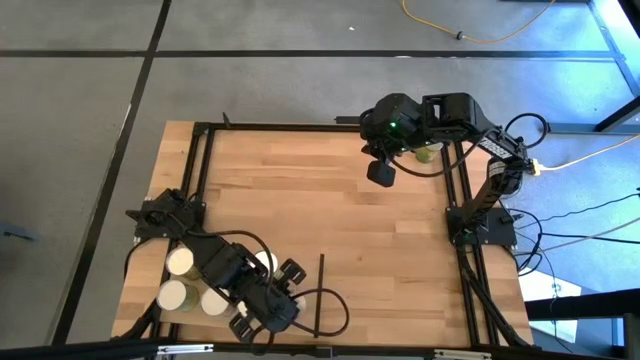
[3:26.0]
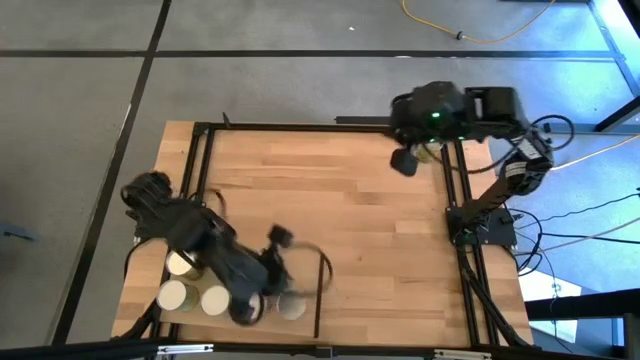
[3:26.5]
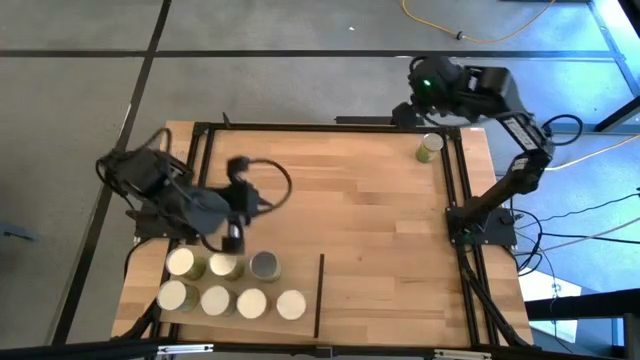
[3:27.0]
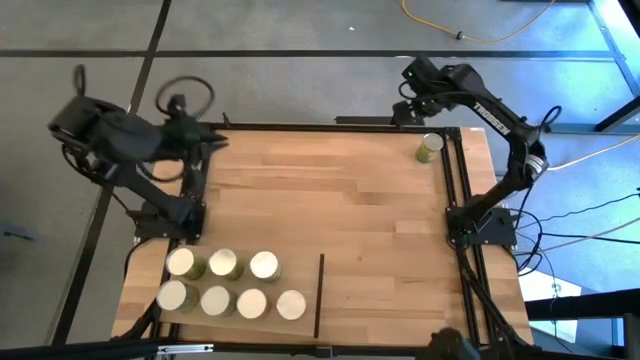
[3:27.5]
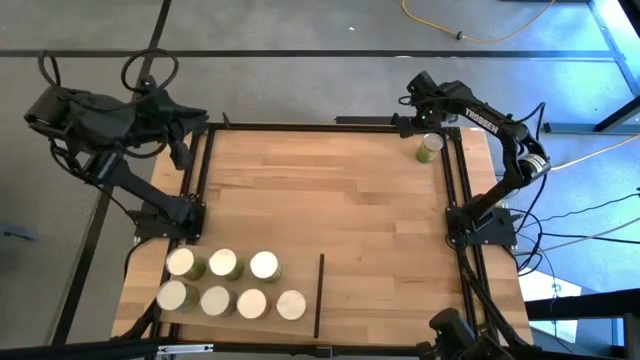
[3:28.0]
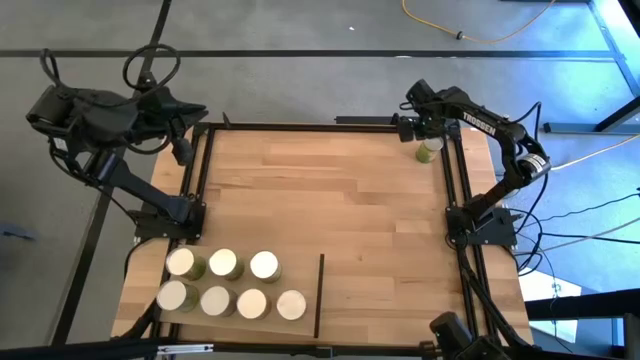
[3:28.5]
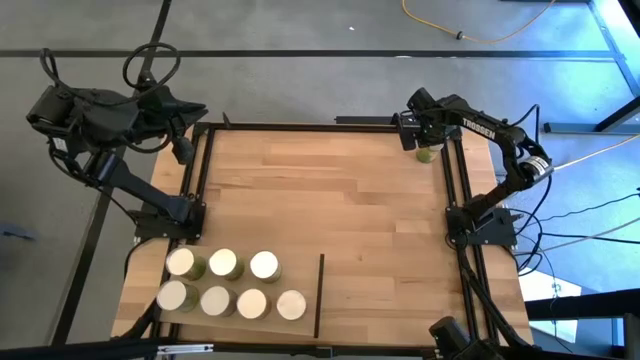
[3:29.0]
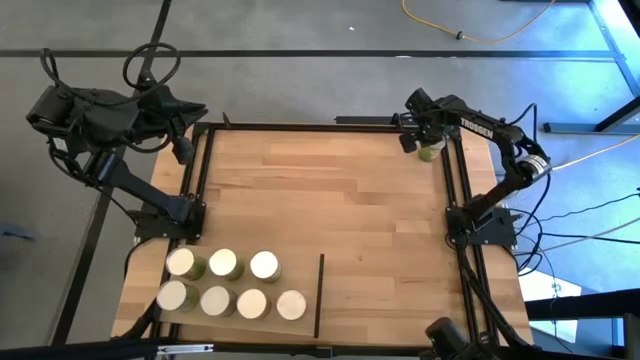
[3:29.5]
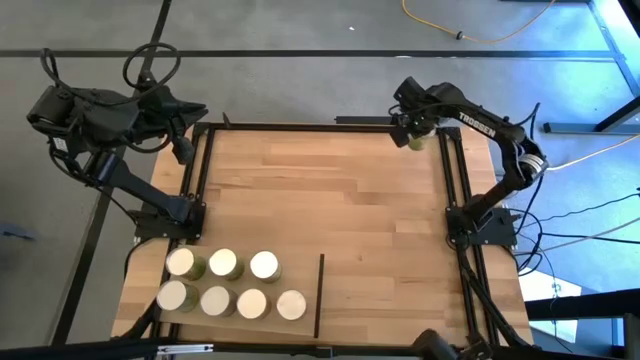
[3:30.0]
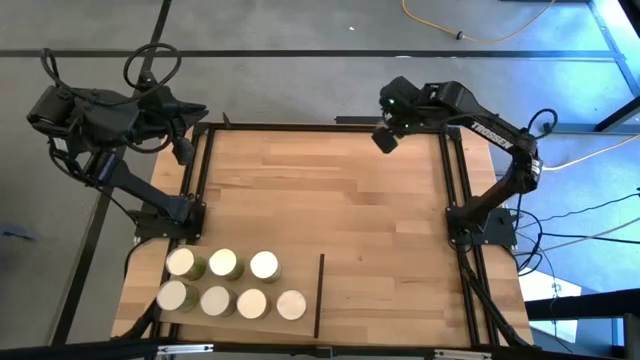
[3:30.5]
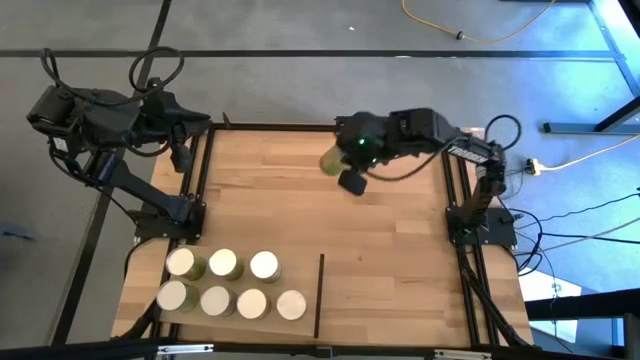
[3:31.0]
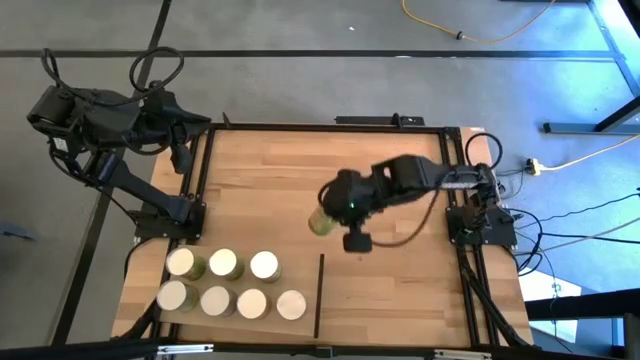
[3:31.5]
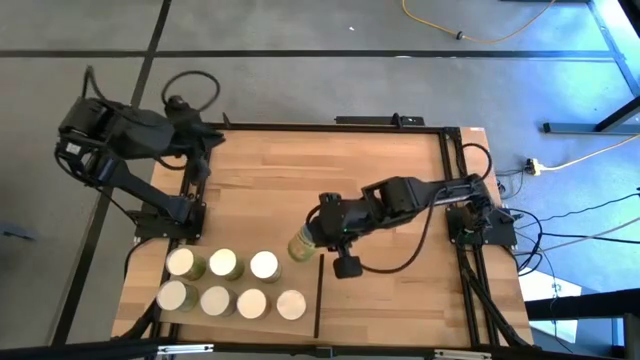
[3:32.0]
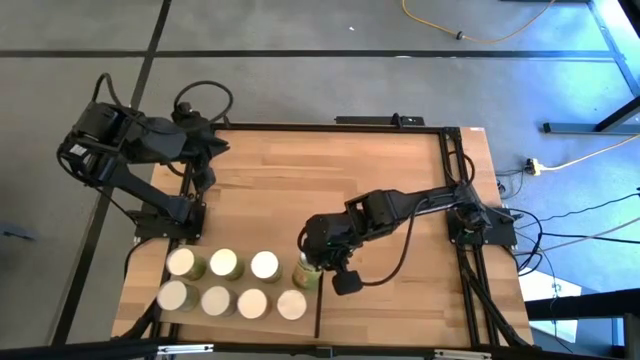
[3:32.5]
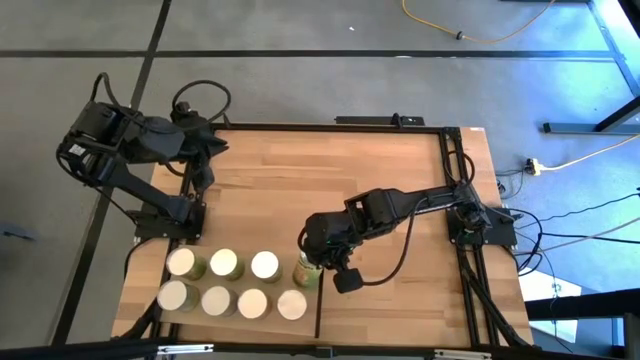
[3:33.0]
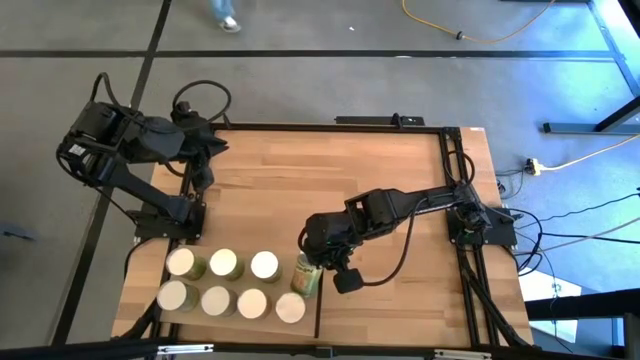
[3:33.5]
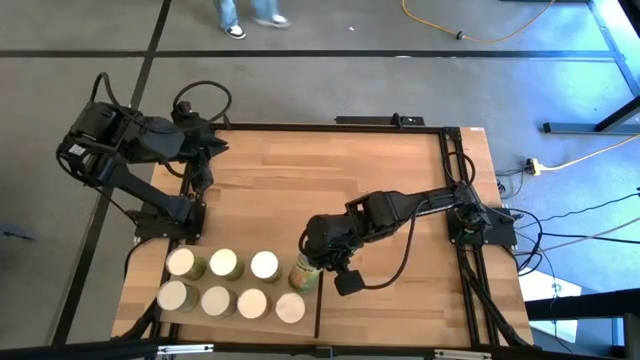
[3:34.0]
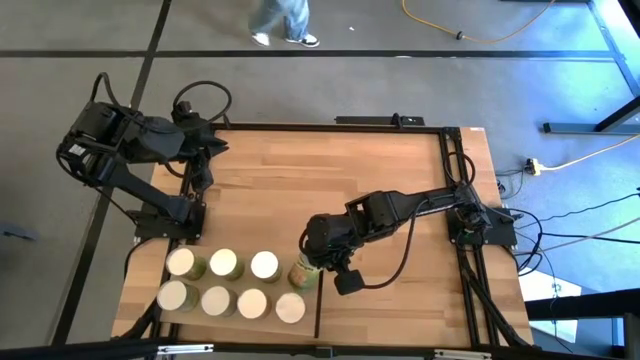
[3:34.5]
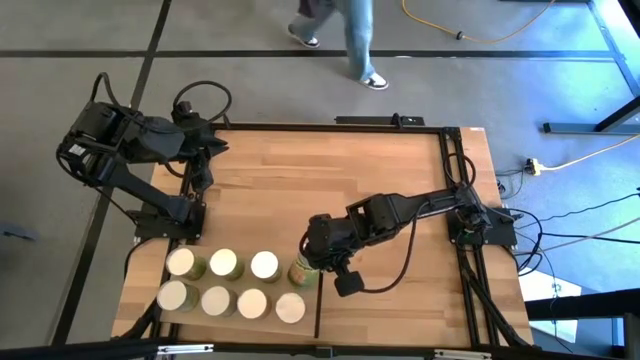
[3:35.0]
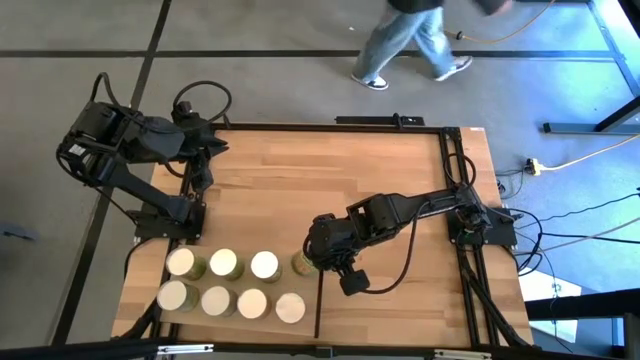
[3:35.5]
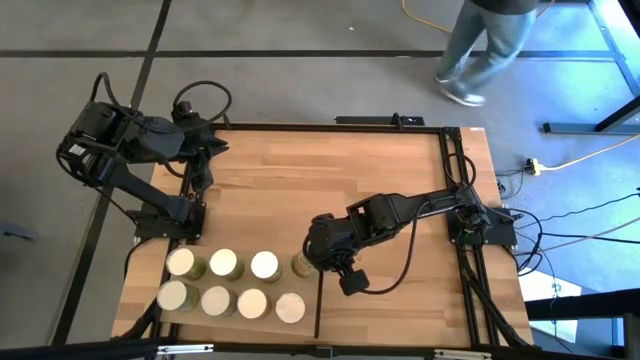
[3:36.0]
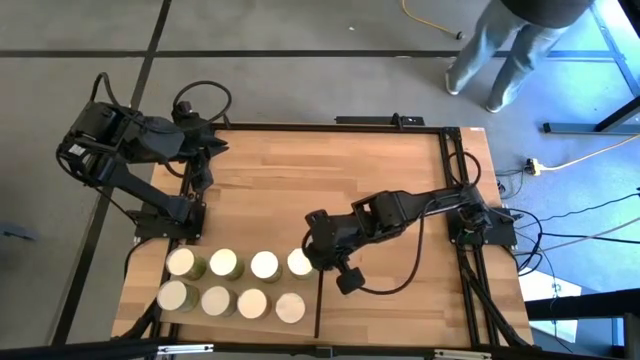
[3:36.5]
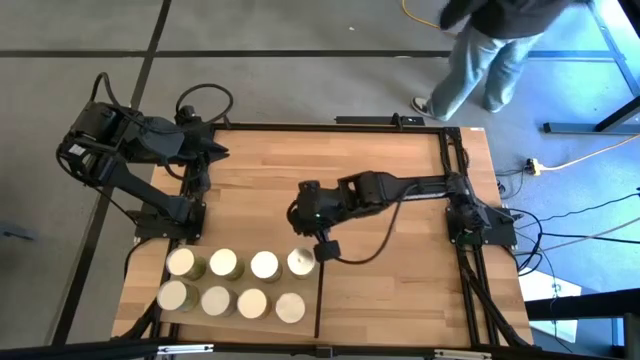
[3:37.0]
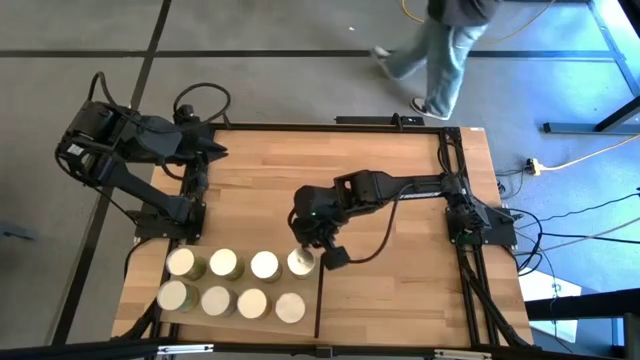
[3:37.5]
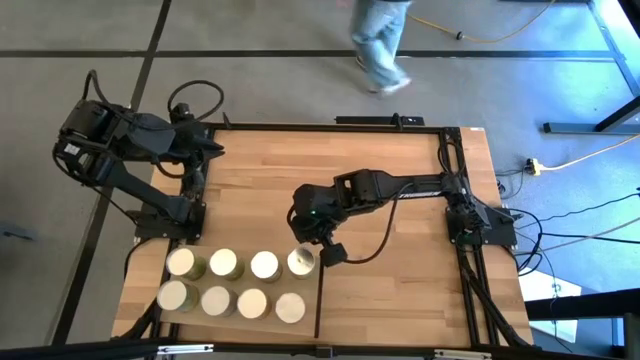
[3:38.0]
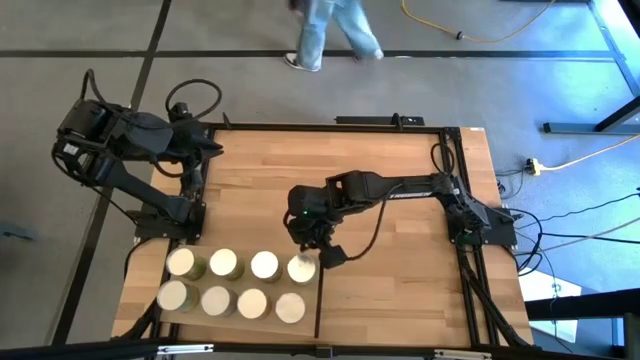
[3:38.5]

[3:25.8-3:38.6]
Task: Pick and place cans onto a shelf
Put the canned oranges on the shelf

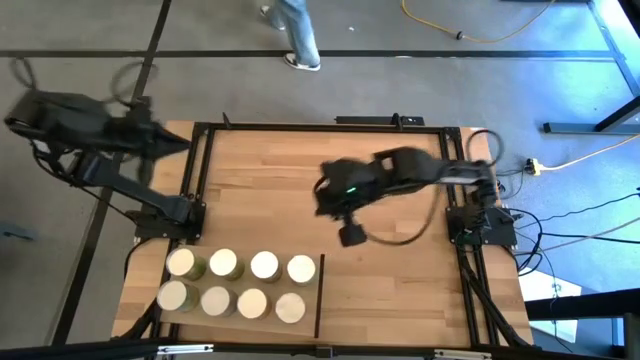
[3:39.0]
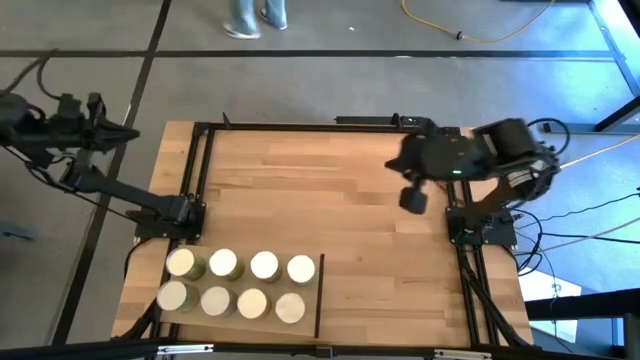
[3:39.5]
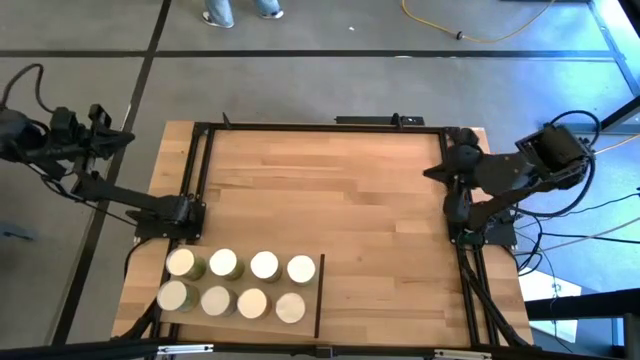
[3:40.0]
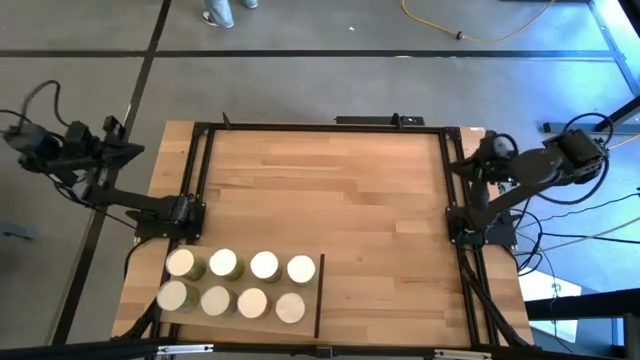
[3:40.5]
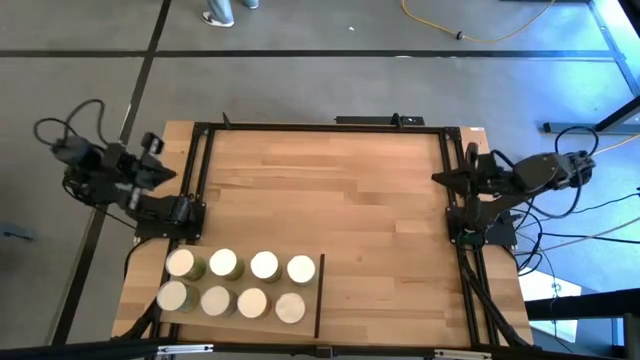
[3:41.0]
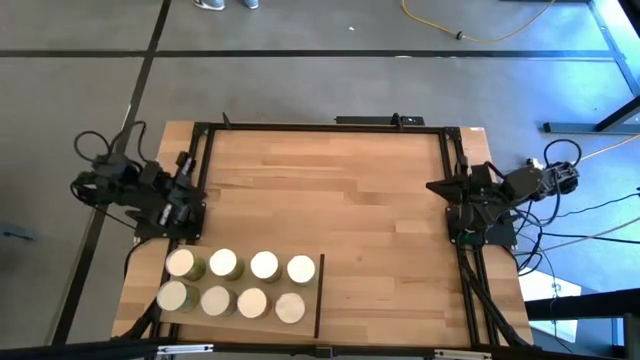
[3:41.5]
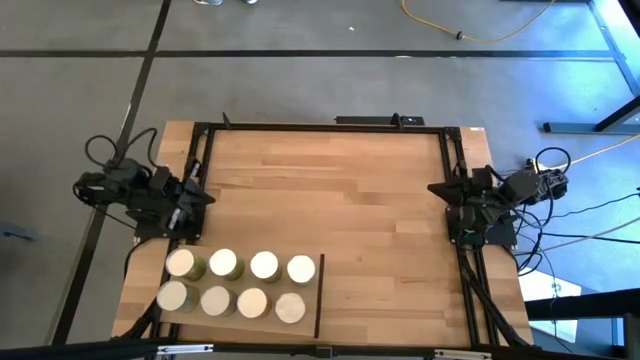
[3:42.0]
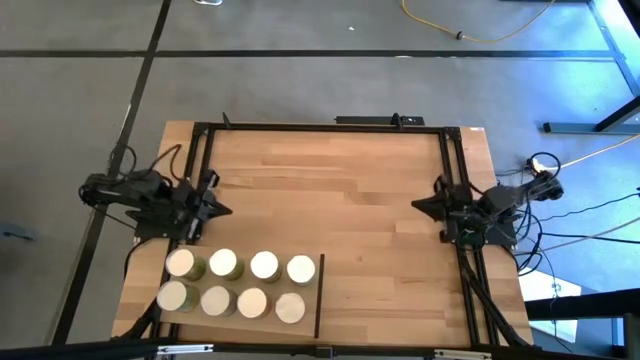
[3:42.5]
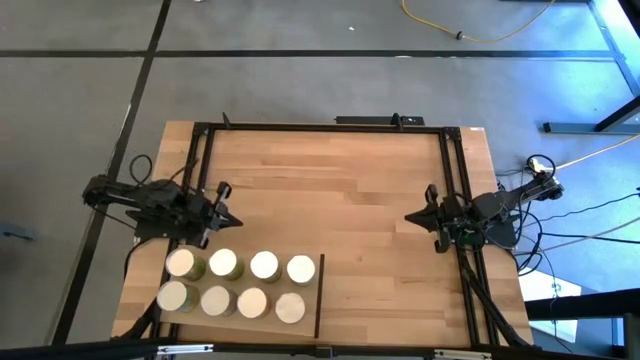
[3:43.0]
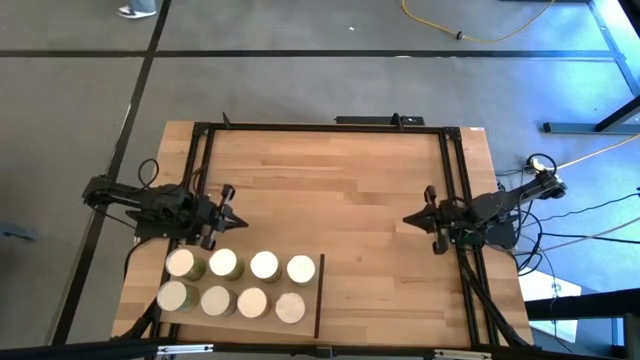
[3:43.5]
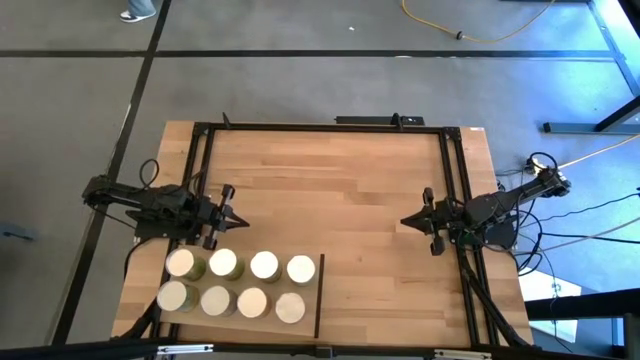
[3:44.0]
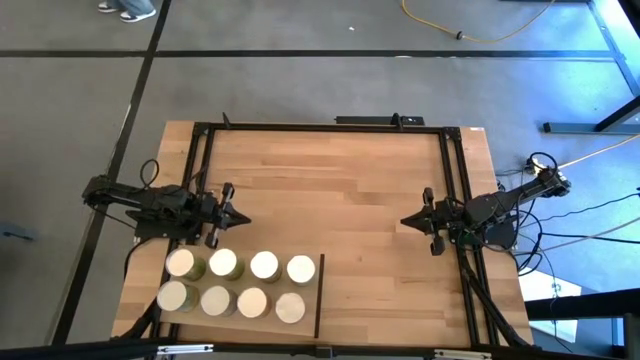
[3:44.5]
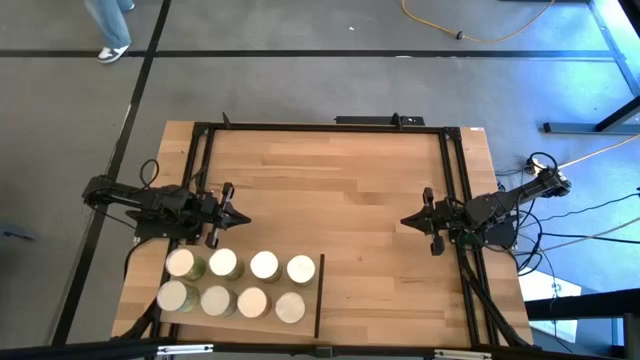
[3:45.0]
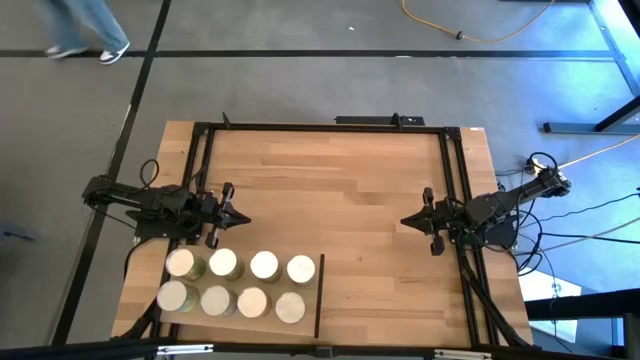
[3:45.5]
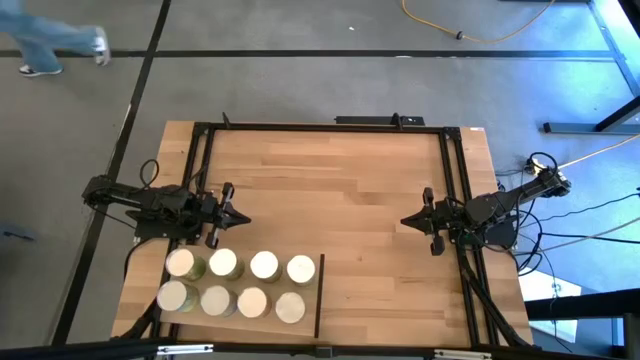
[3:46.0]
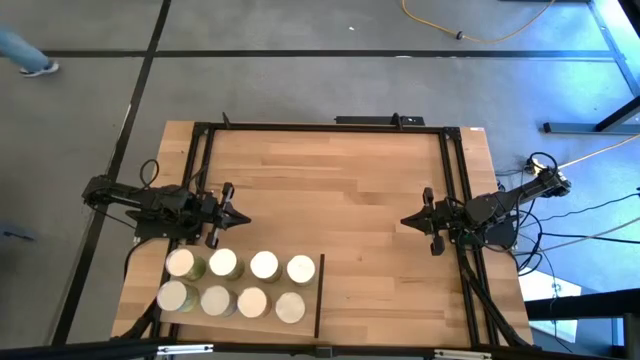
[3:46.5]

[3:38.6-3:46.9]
Return to Home Position
